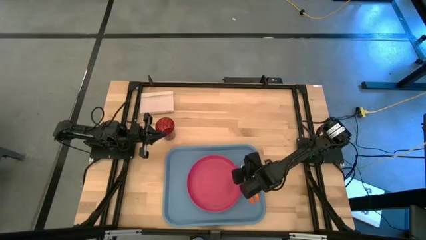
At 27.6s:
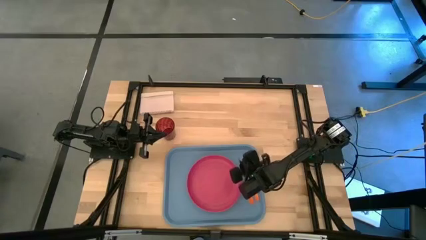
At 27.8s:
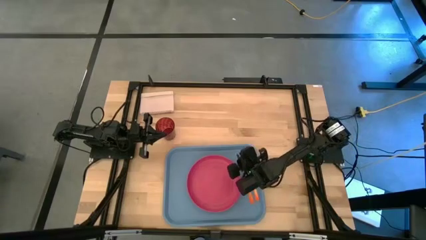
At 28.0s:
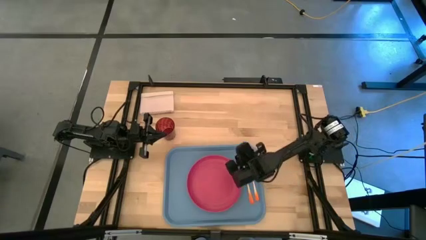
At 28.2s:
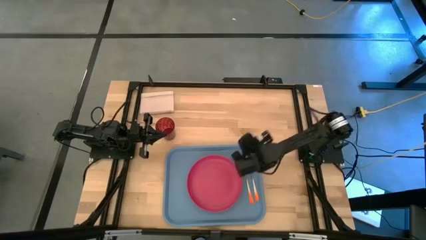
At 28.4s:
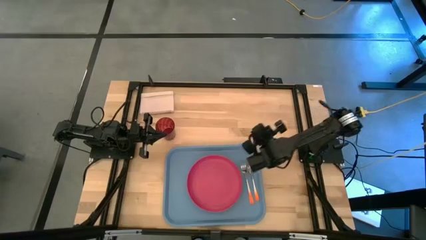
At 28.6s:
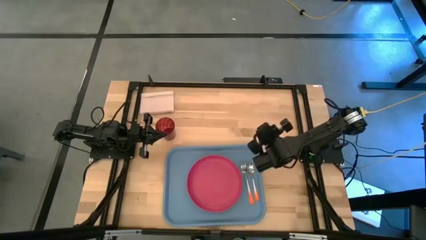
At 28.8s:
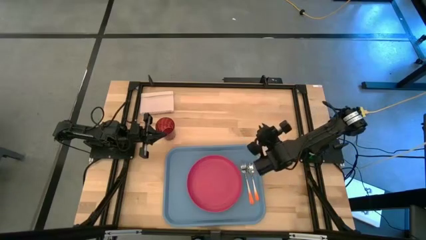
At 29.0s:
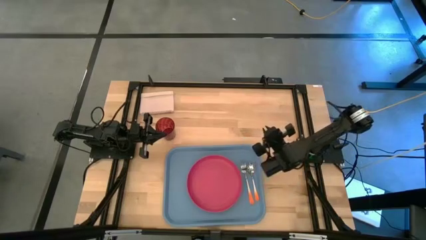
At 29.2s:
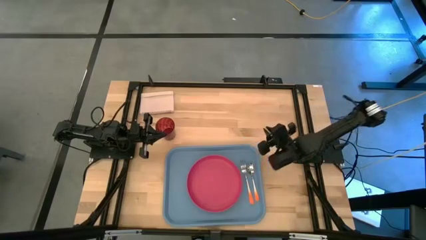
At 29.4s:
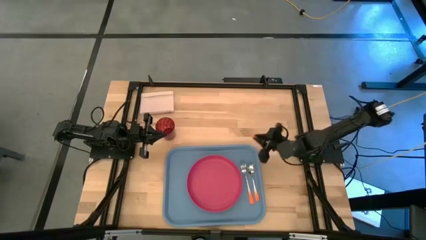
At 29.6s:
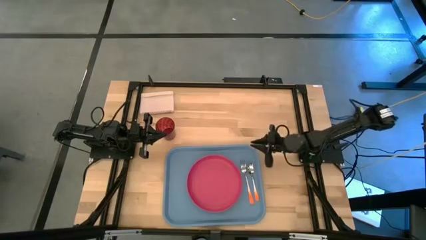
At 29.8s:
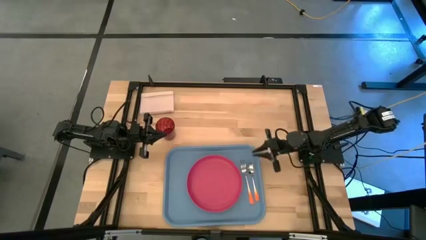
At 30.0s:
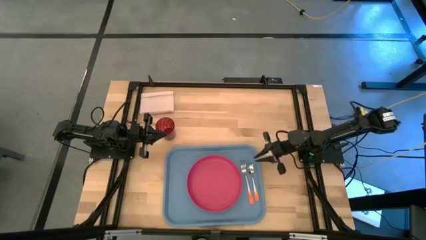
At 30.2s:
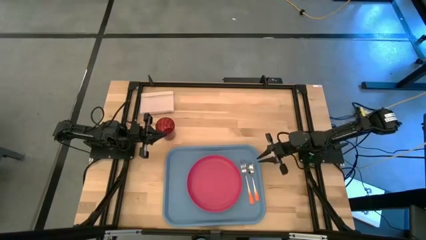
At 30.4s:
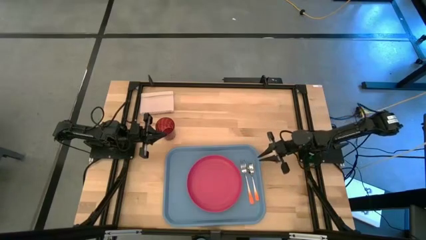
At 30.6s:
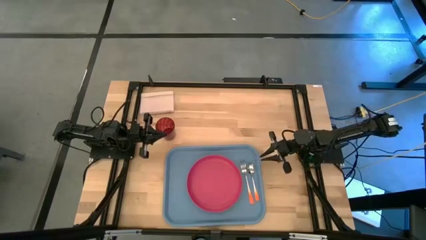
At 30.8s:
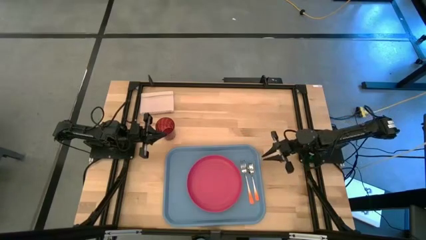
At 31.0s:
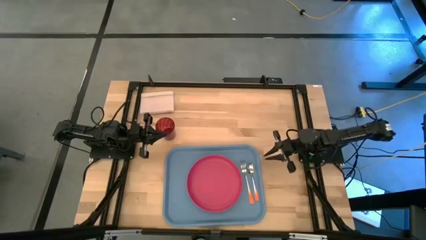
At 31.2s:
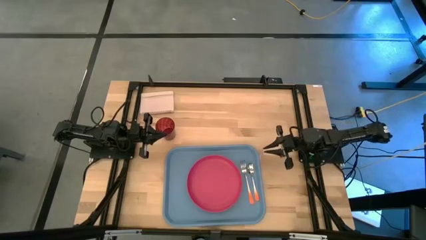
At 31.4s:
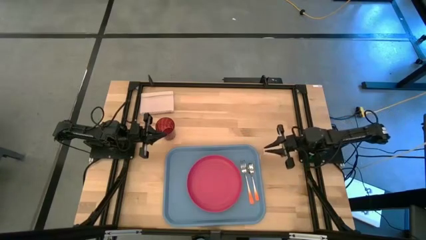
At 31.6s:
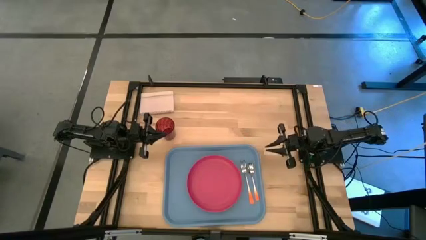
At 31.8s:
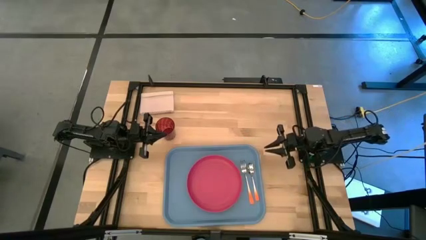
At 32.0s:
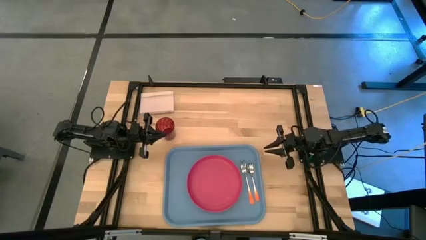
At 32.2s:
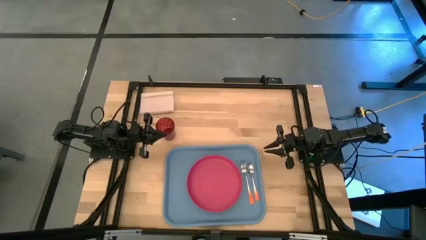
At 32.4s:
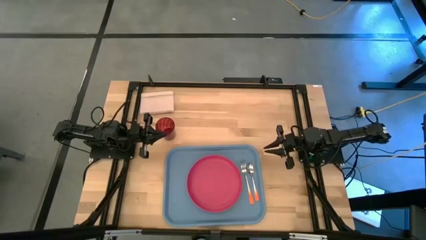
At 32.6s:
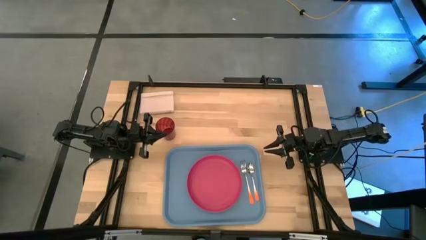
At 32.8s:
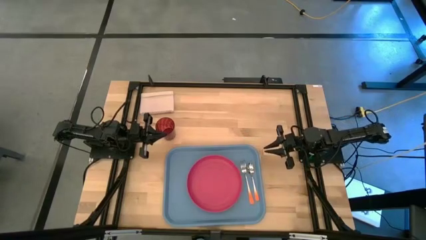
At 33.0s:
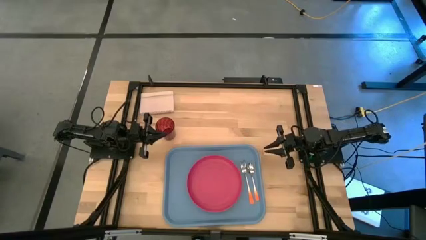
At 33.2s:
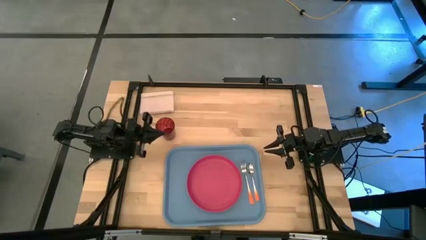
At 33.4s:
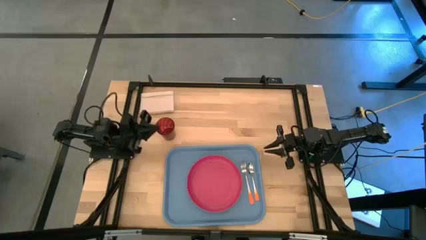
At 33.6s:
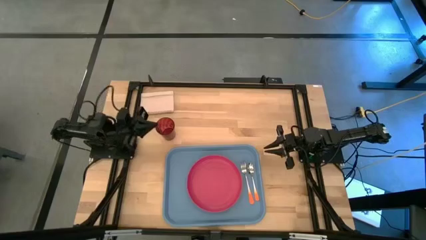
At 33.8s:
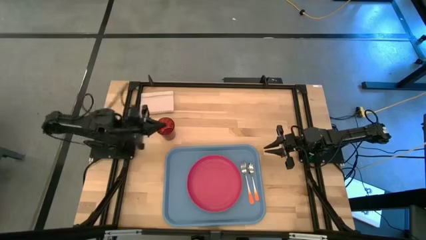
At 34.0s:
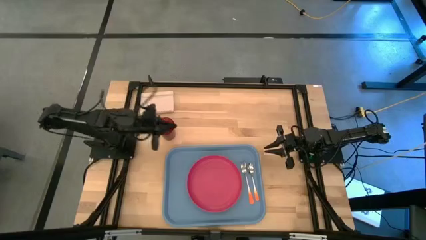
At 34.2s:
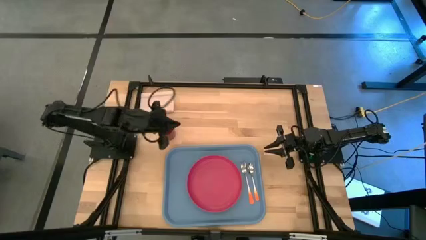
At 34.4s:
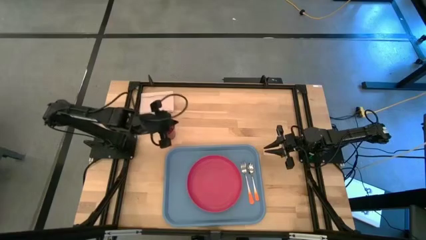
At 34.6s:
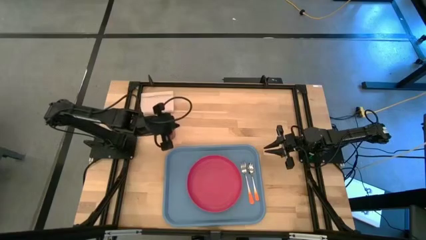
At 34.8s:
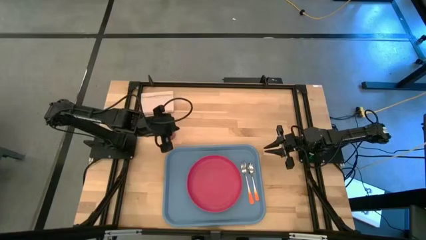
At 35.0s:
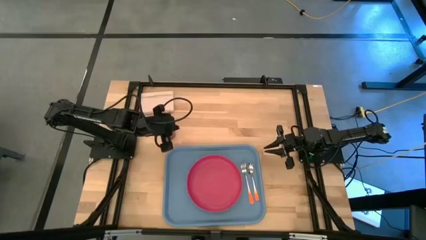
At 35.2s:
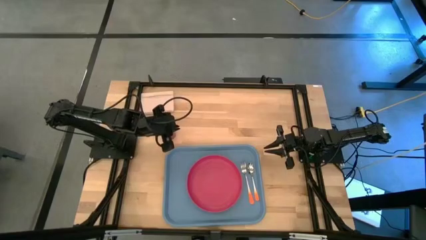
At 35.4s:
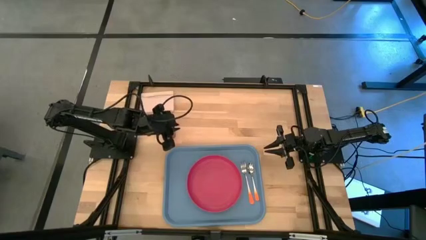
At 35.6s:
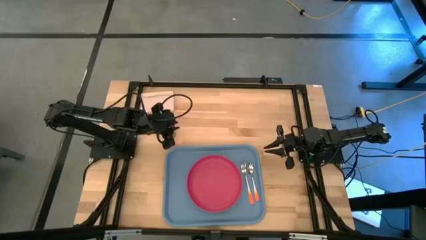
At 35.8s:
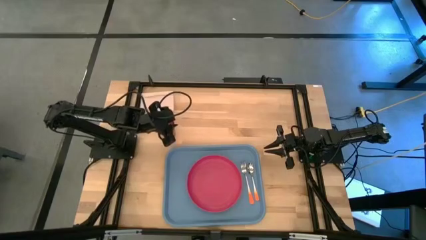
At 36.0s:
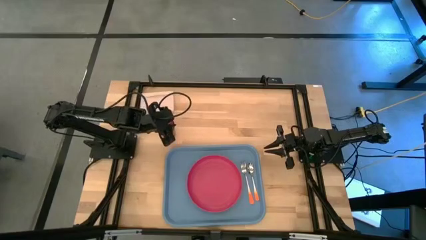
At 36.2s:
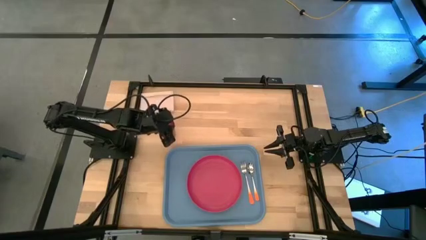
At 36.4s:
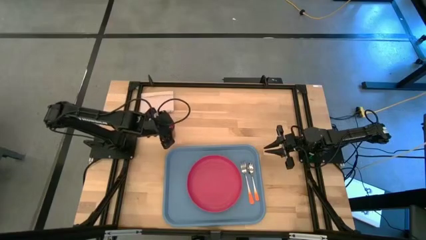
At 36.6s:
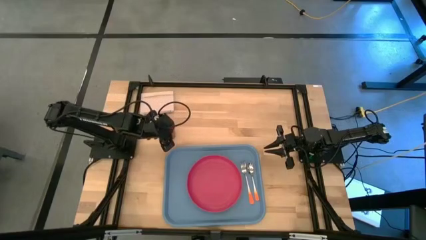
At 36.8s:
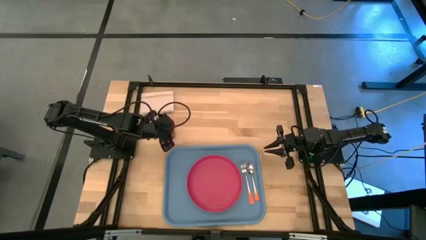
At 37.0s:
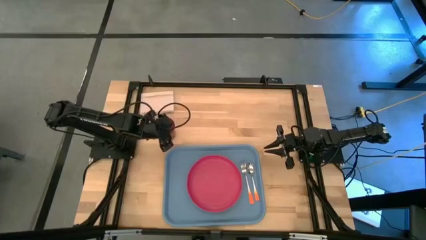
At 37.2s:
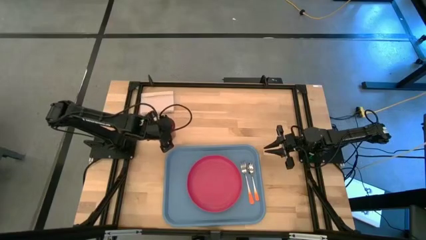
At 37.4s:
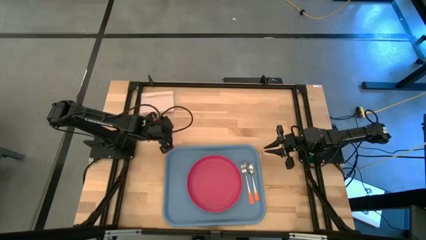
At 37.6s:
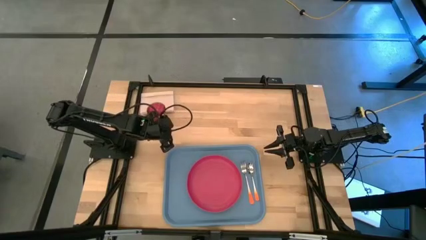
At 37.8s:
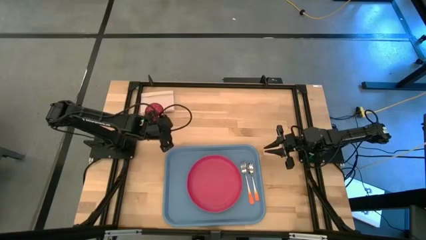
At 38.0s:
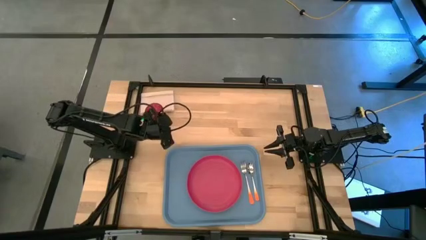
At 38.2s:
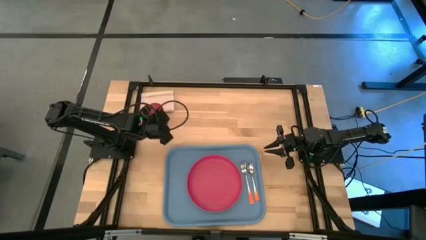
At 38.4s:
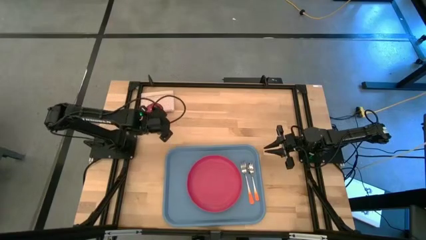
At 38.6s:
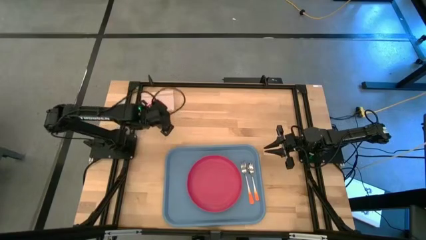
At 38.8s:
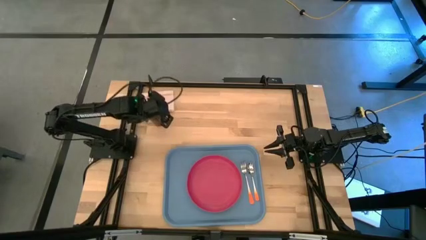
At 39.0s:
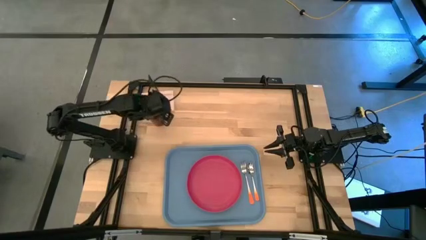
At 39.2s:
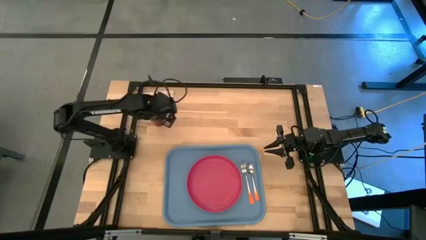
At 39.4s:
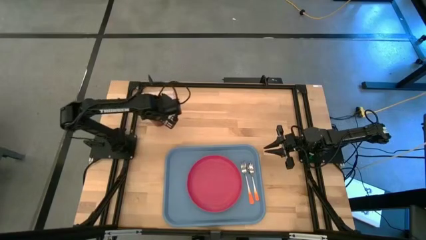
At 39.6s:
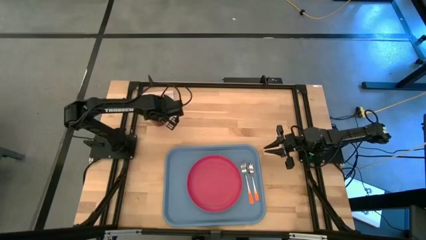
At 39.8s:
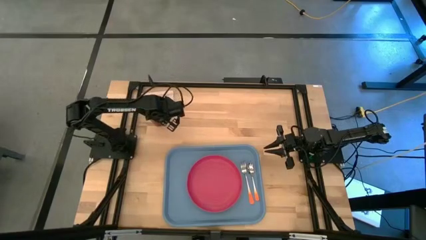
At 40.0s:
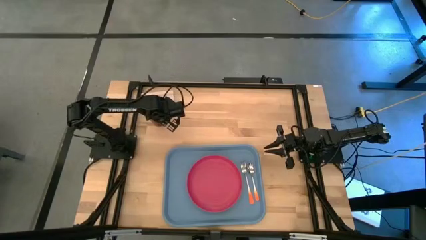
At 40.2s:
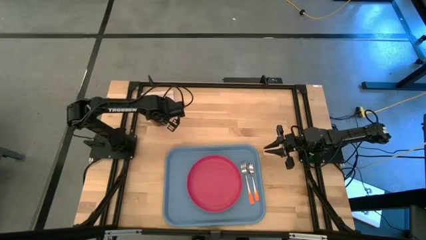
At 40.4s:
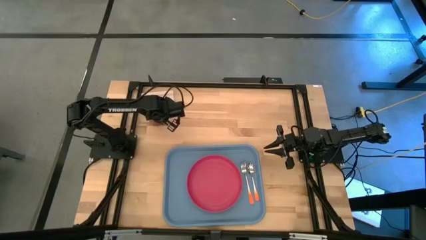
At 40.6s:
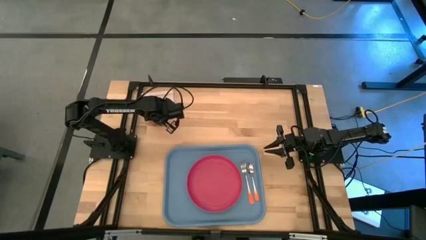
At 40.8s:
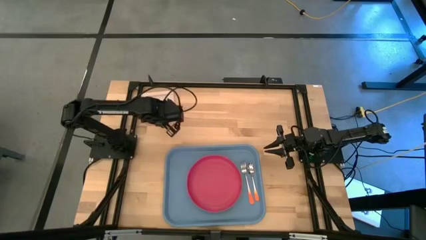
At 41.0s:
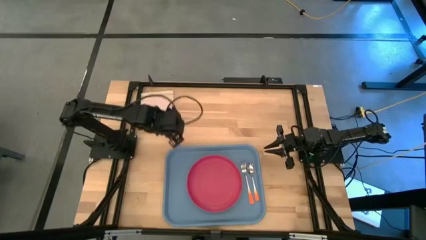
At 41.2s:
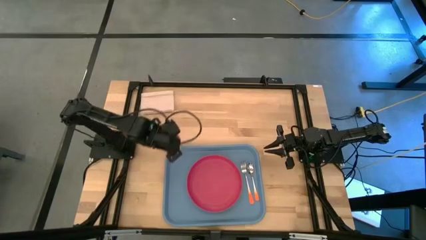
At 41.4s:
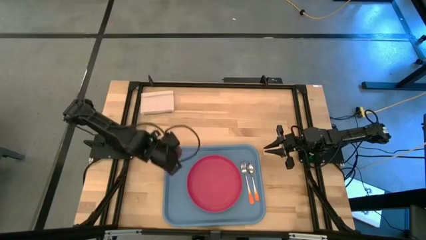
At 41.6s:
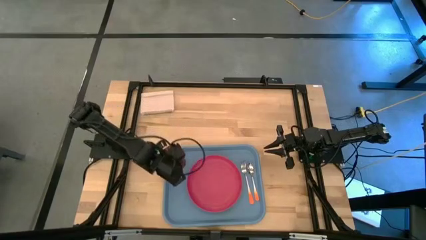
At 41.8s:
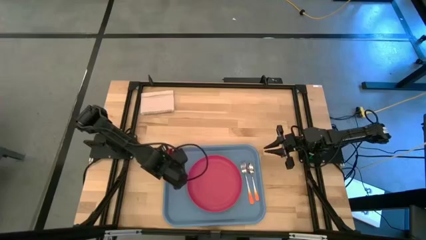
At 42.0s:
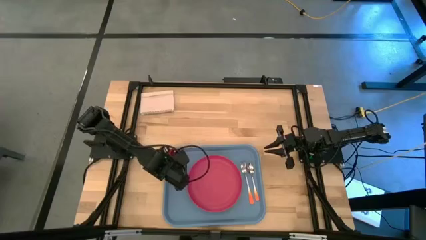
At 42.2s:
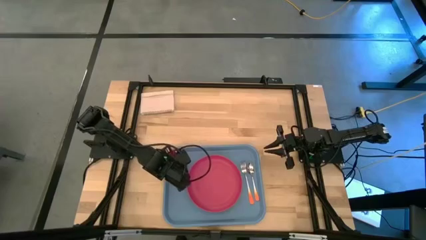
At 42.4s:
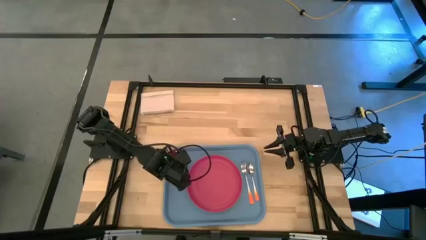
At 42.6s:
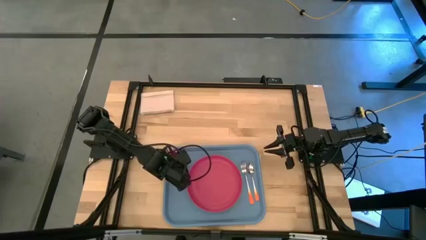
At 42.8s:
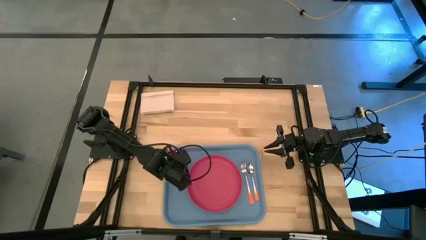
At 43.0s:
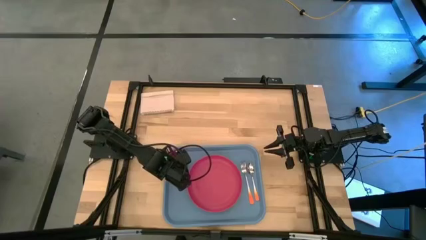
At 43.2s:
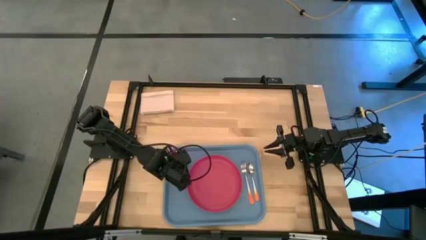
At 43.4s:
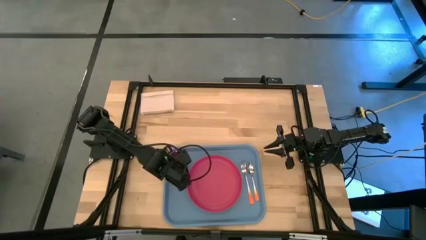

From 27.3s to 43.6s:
Task: Pick and place plate/cup/fork/spoon on tray
Put the red cup on the blue tray to the top left of the red plate
